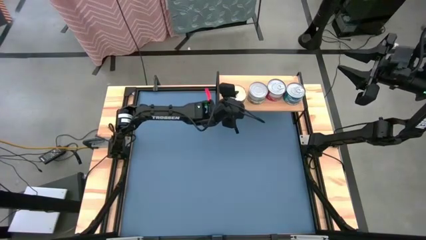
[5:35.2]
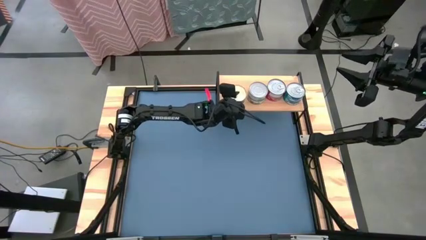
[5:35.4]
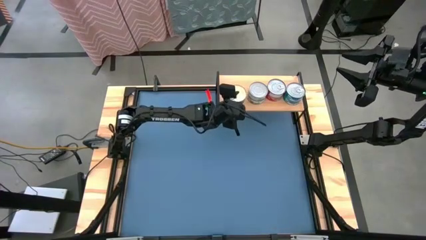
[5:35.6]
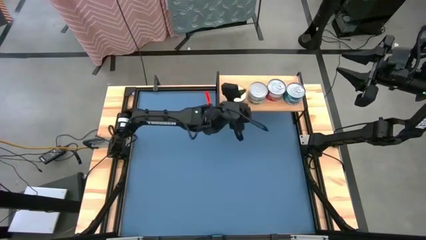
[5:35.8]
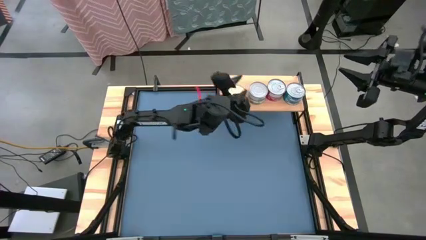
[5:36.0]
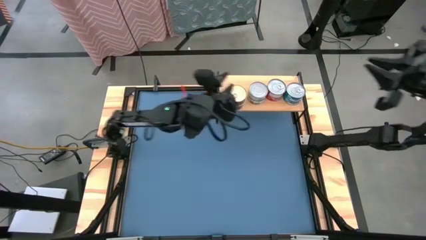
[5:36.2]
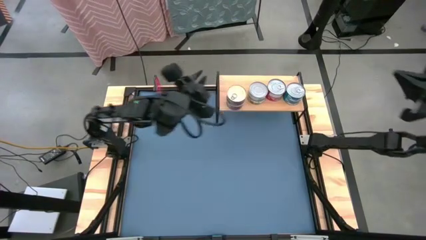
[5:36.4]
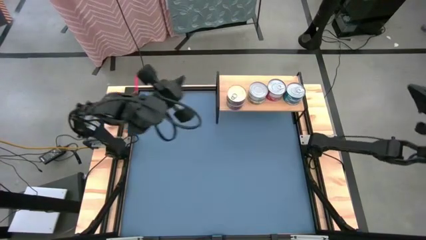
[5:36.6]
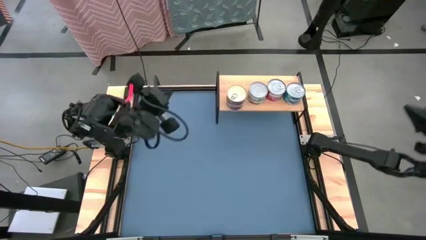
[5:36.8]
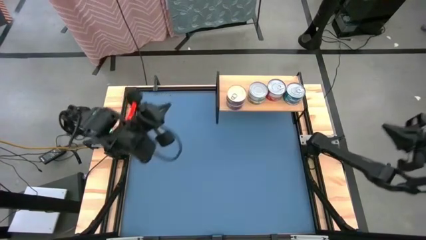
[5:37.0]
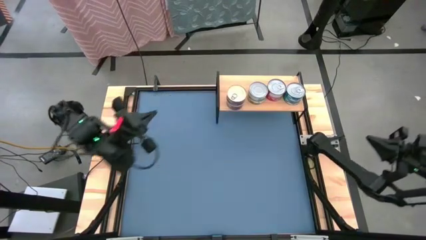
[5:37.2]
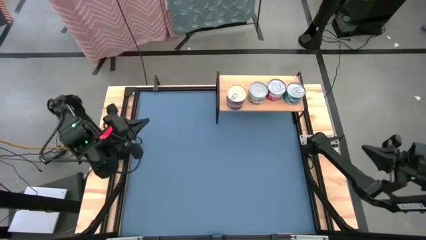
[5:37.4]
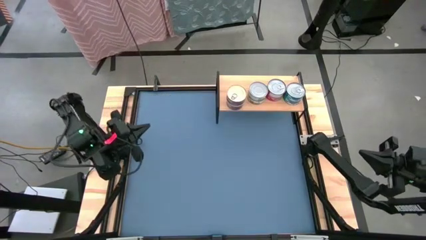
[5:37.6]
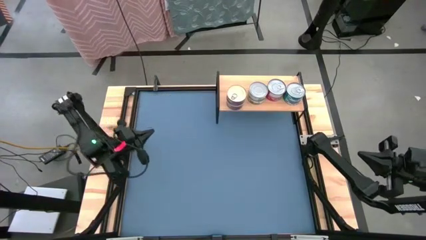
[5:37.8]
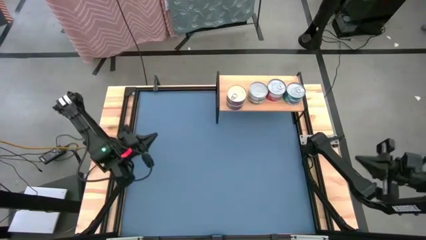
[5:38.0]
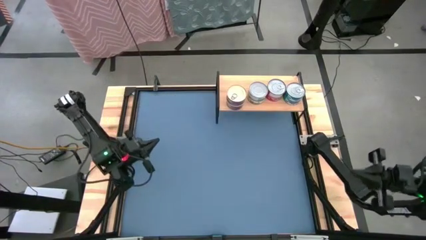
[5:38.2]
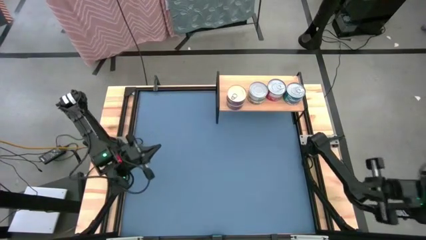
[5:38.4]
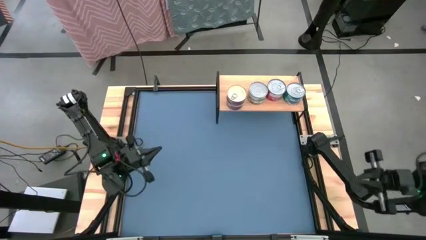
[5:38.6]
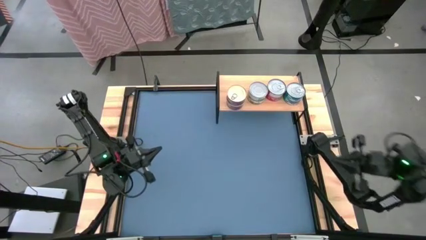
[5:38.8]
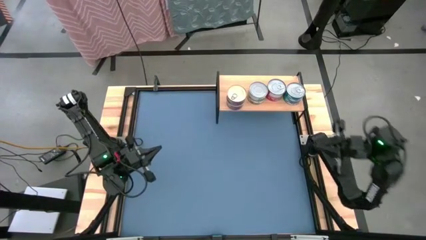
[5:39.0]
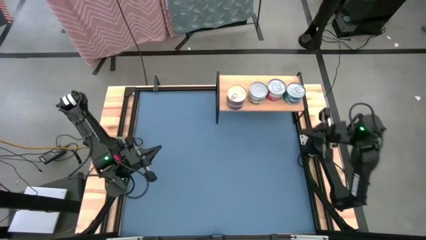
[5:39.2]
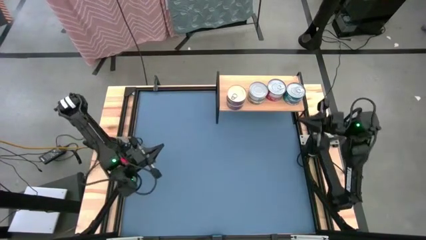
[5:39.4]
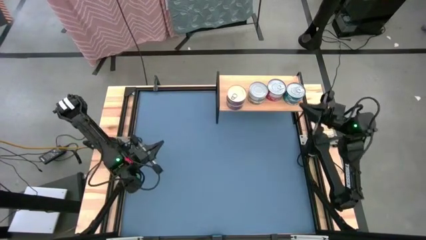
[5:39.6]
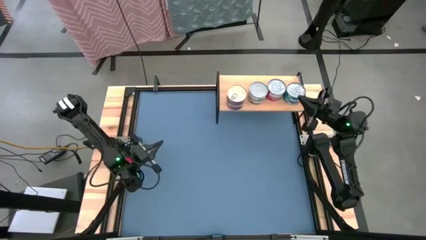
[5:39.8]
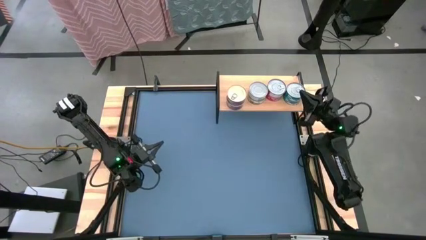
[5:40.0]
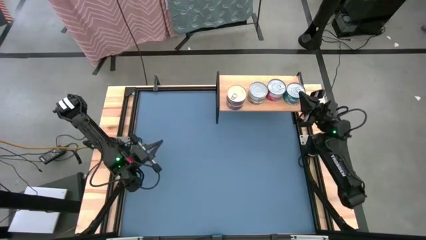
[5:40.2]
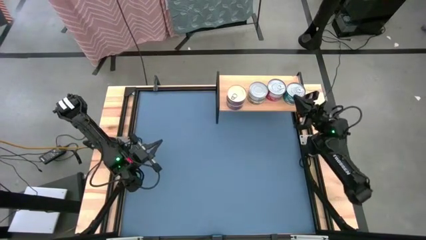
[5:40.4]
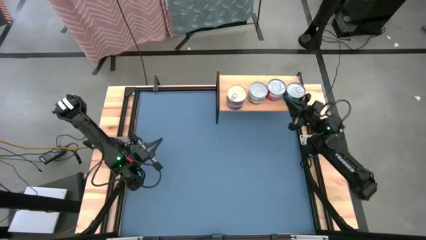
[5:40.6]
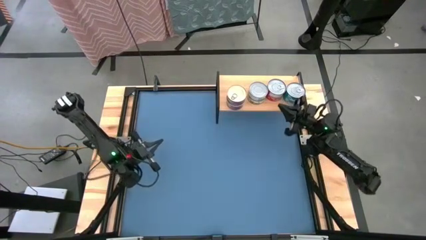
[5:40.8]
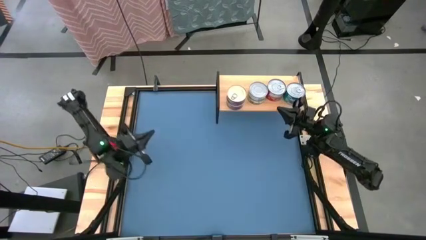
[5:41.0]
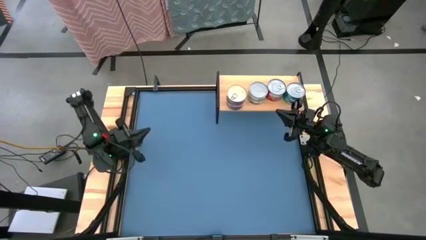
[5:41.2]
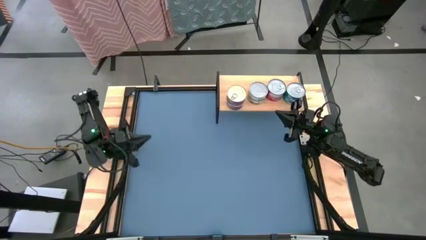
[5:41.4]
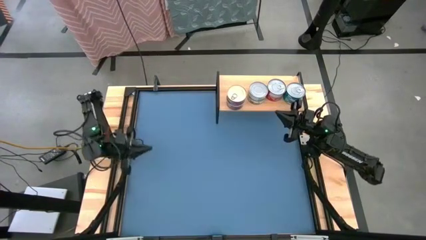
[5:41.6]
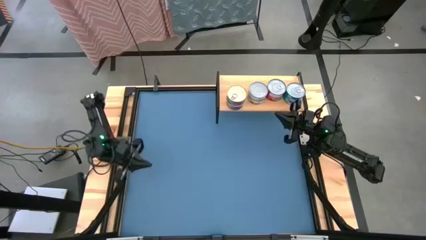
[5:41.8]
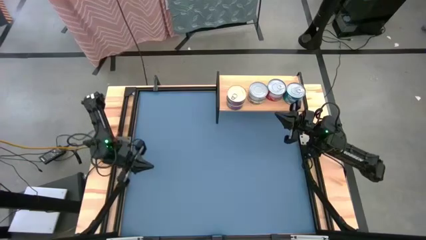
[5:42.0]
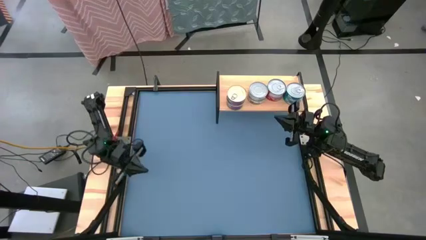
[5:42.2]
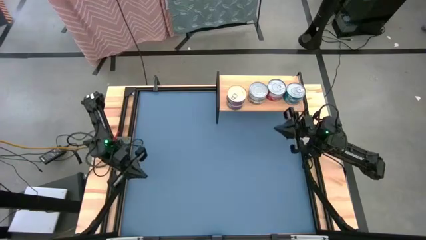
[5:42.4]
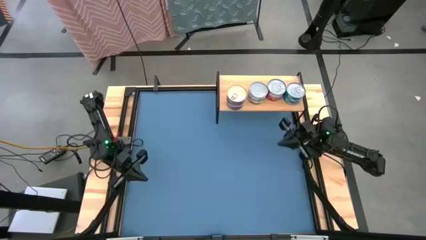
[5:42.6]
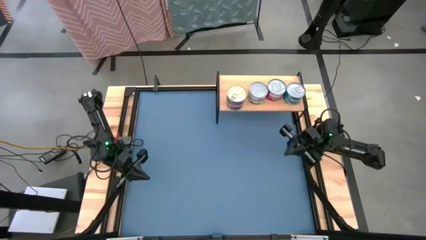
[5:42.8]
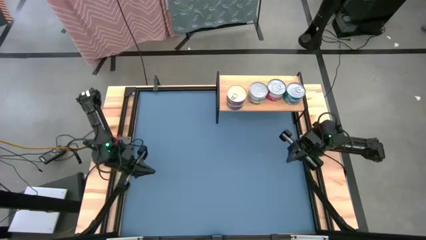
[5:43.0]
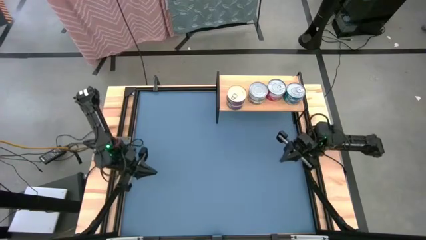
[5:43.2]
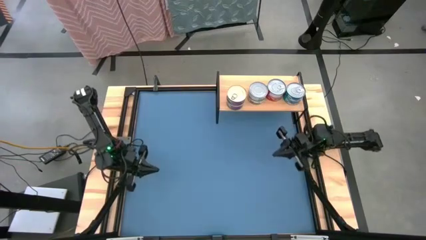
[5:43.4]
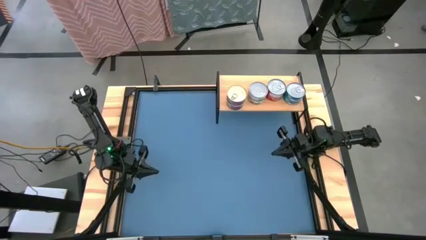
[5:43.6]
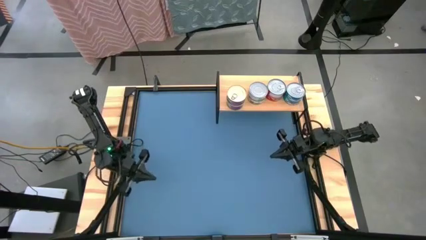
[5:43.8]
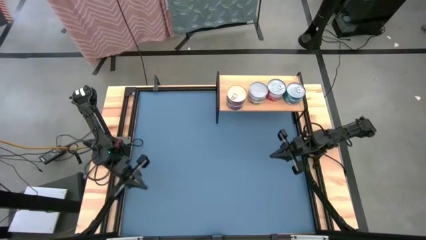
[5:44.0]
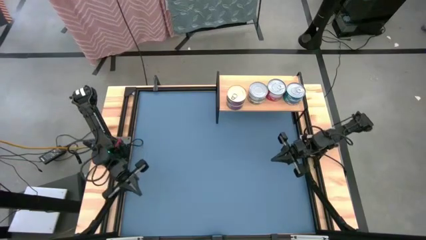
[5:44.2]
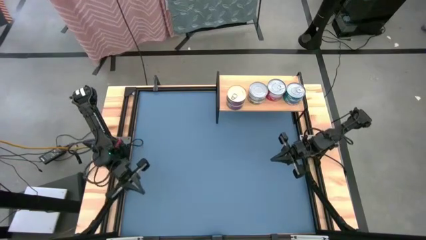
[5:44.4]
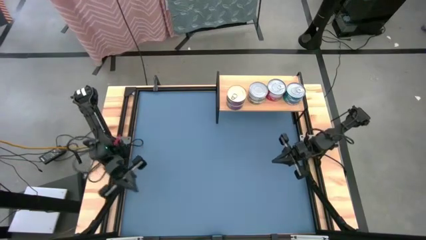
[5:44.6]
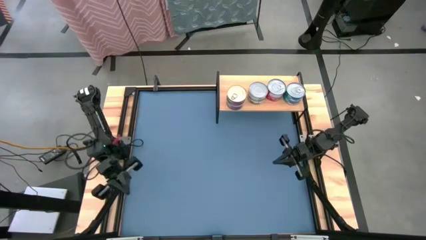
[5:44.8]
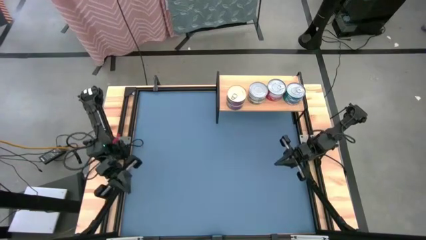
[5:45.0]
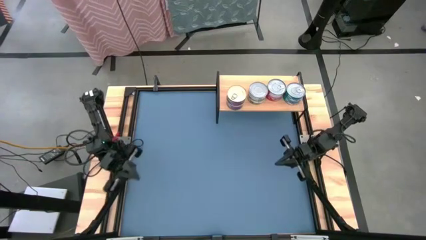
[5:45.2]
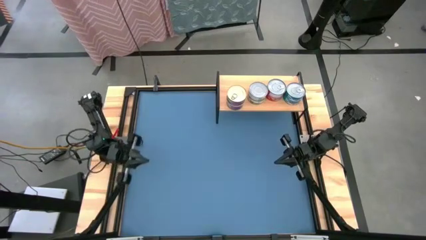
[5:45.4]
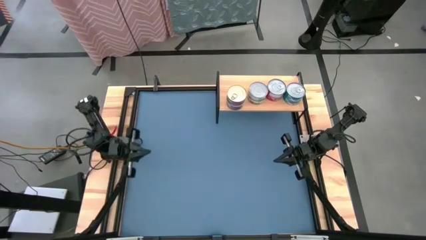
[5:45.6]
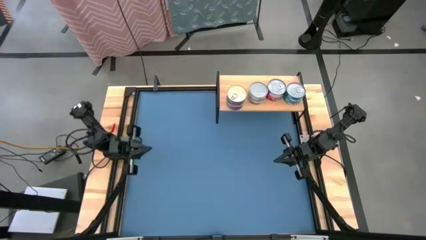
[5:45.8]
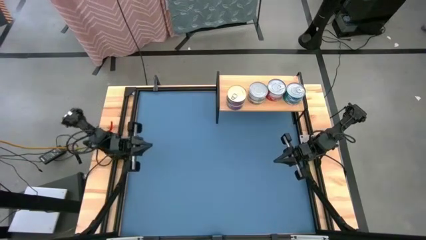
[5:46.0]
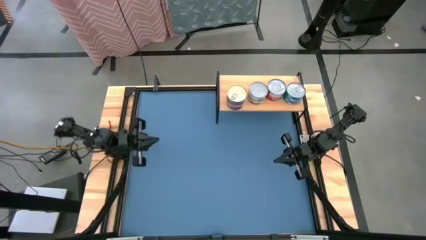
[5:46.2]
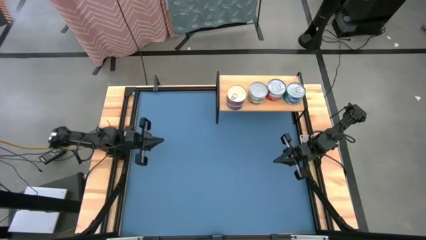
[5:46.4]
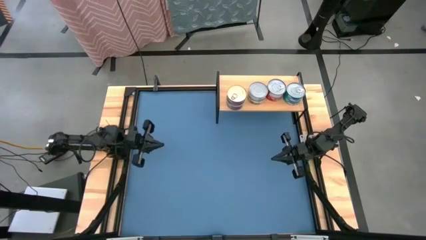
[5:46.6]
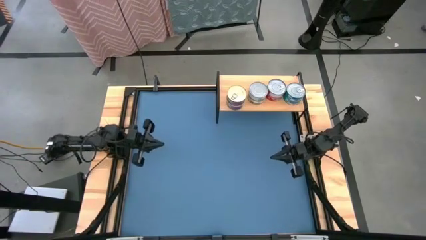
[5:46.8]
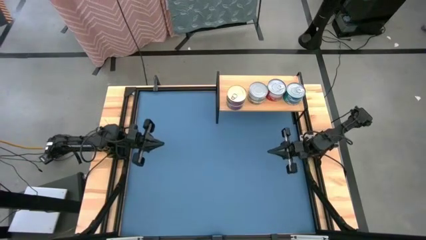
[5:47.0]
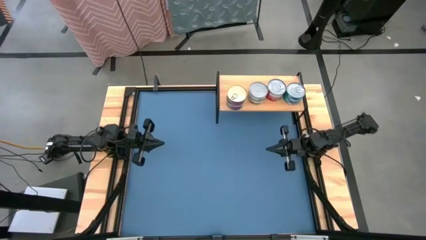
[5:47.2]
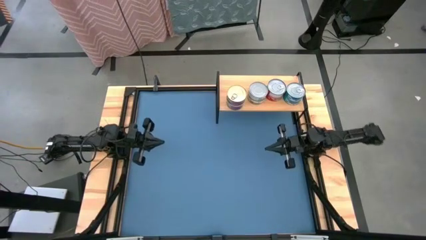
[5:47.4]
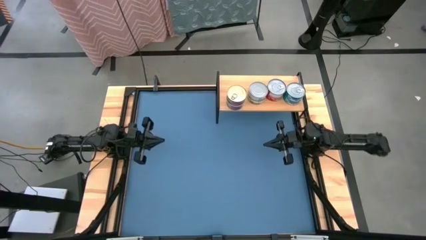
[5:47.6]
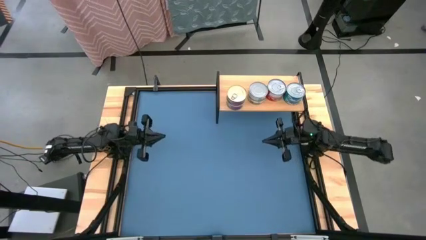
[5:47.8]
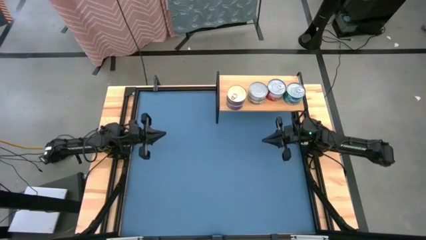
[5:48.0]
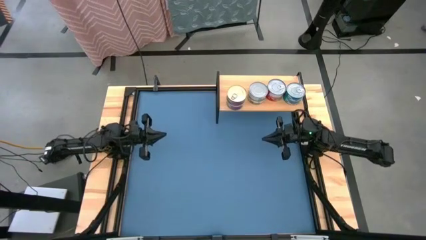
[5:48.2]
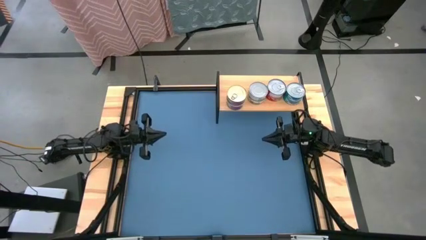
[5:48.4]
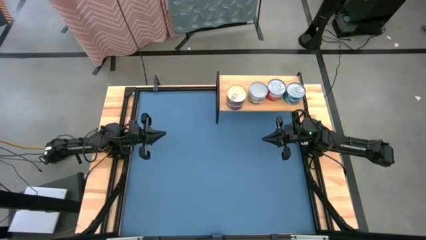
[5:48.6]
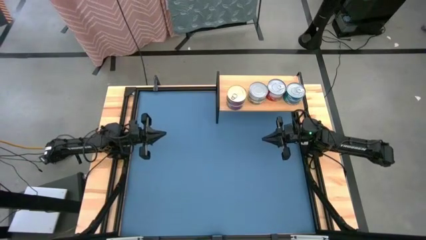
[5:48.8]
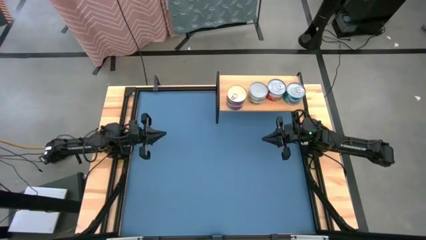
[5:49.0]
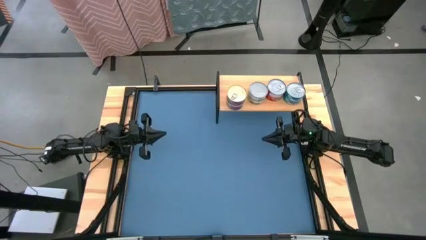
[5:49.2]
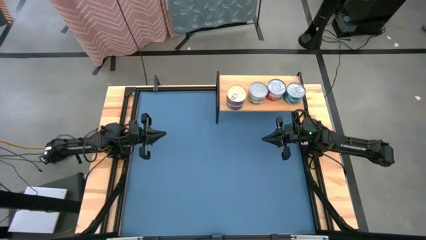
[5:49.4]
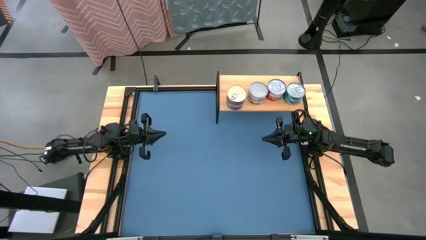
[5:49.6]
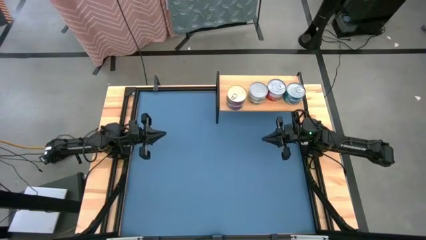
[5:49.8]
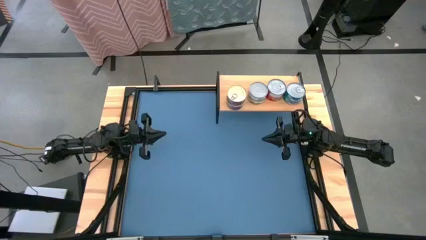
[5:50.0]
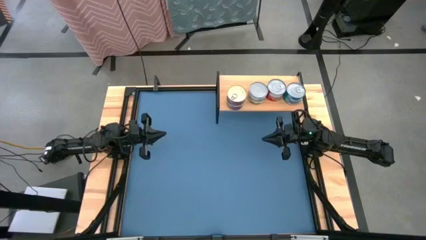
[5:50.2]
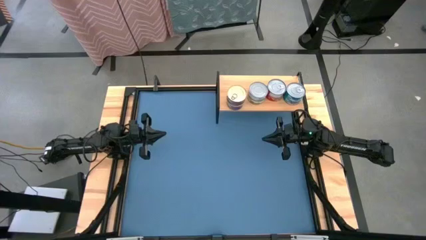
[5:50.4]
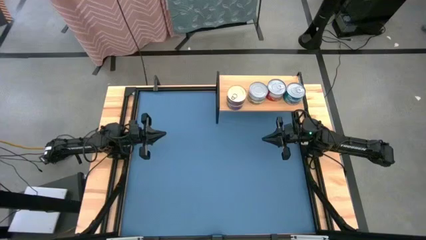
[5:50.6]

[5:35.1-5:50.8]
Task: Stack canned seafood by type on shelf
Return to Home Position

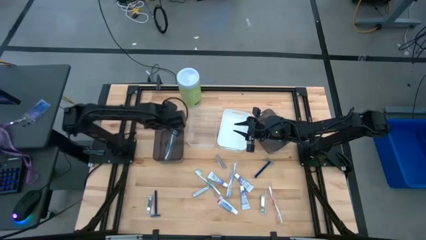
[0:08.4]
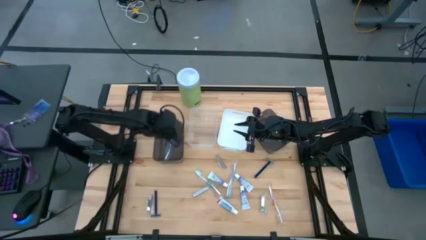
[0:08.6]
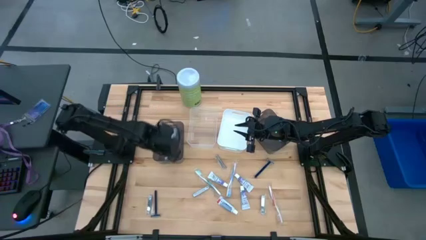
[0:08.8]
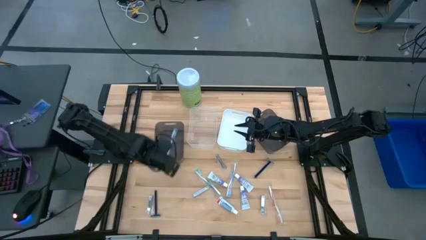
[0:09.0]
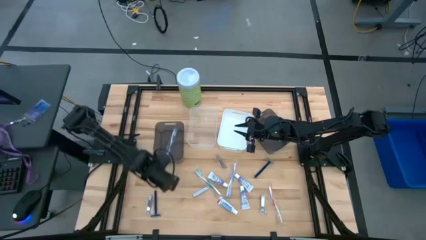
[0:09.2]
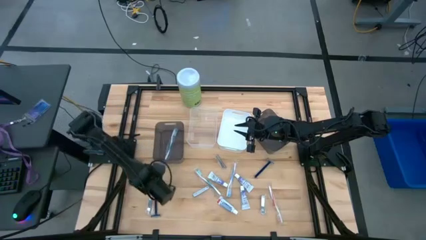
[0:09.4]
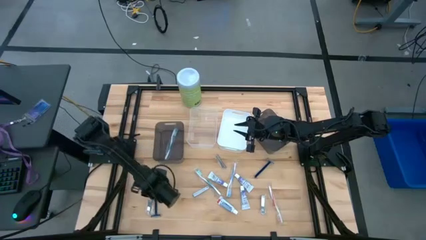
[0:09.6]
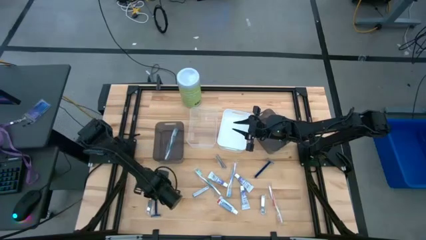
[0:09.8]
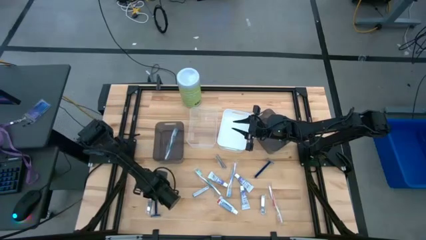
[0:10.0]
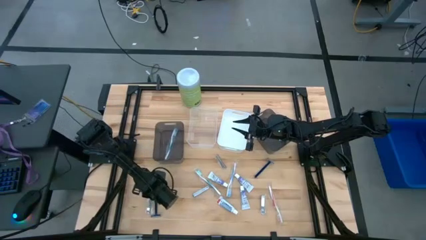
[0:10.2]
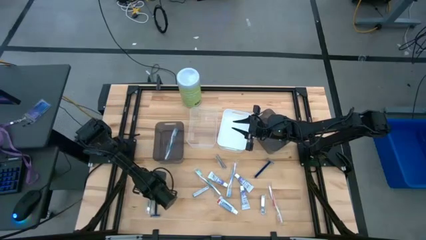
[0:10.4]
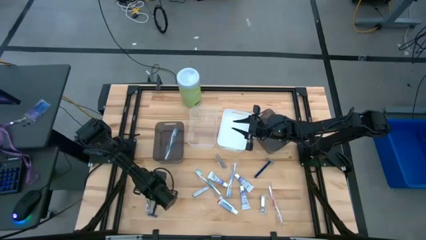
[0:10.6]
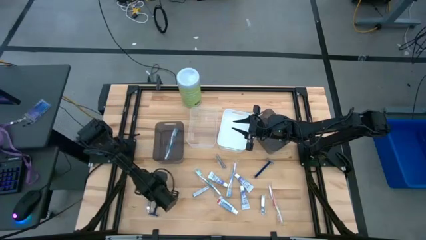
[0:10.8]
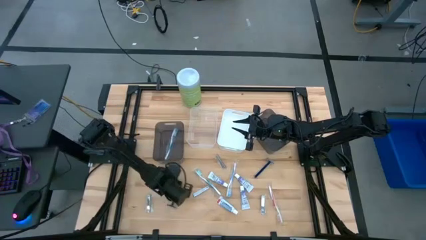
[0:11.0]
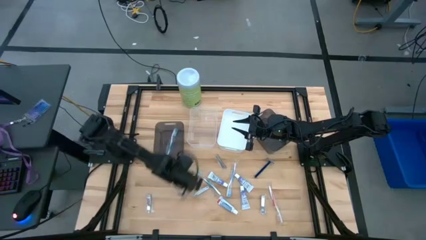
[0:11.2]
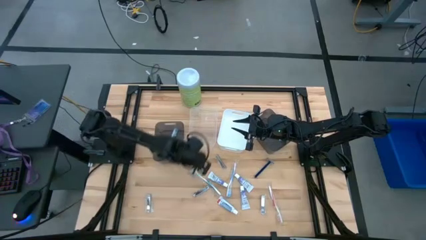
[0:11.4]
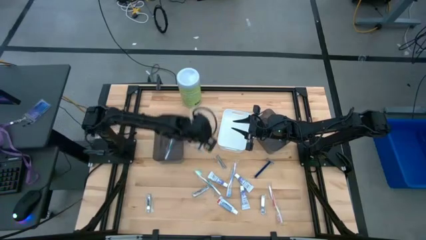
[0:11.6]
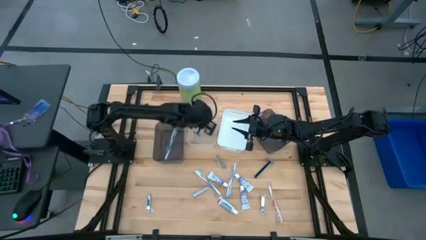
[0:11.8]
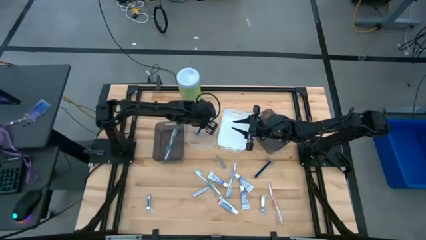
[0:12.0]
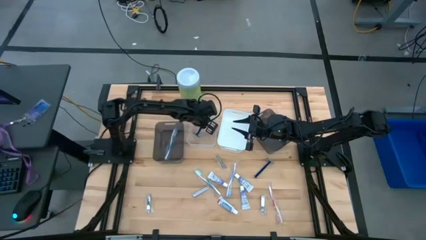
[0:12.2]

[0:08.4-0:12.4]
Task: Pick & Place Travel size toiletries
Put the blue razor into the transparent bin
